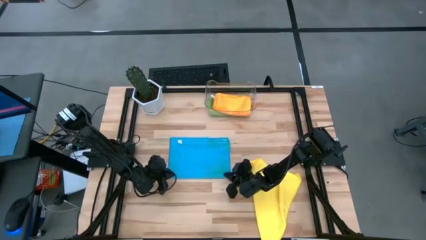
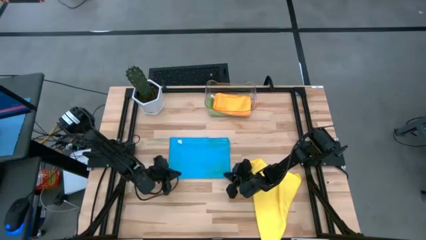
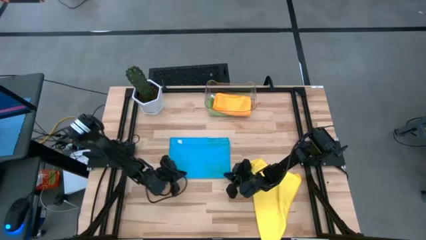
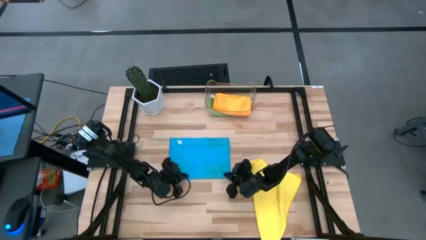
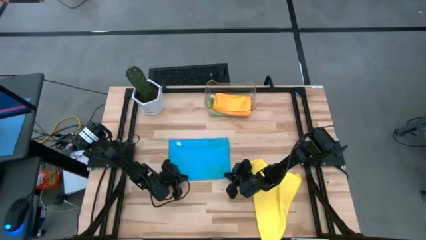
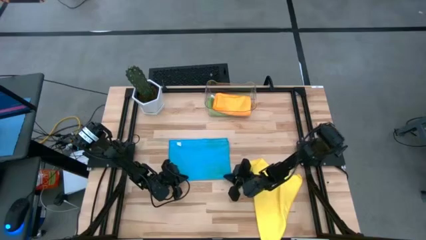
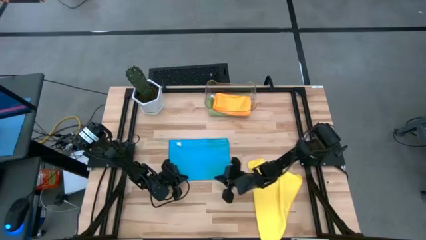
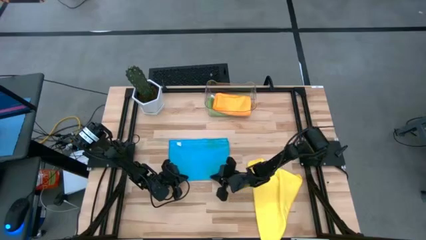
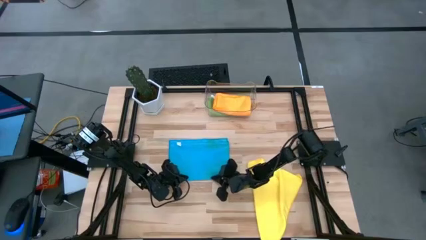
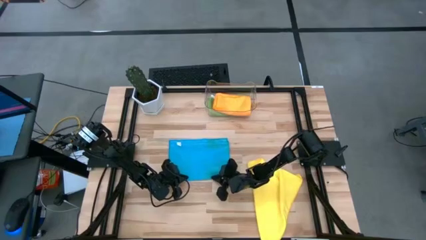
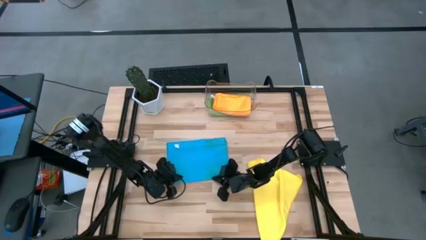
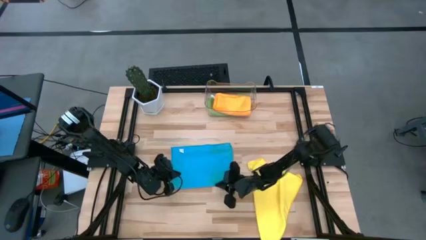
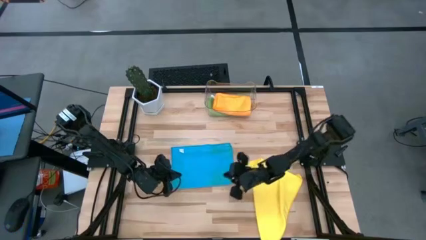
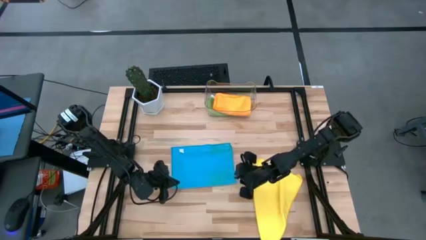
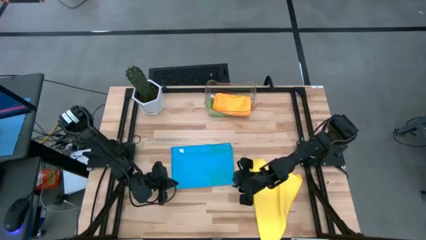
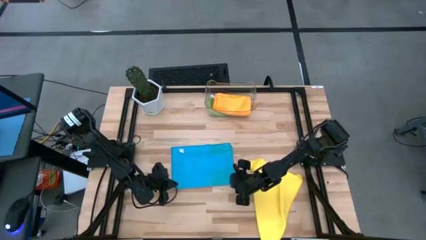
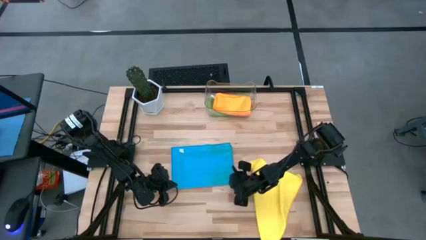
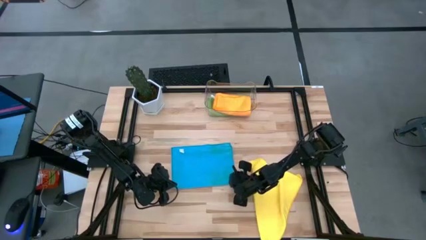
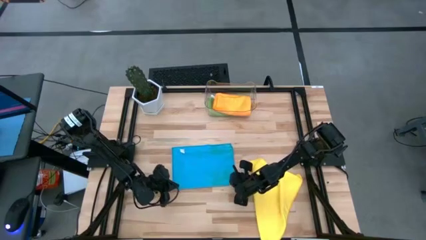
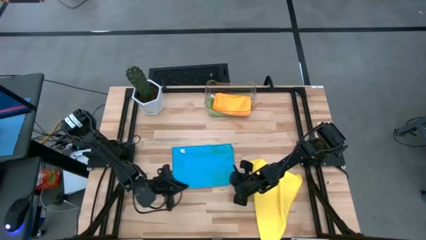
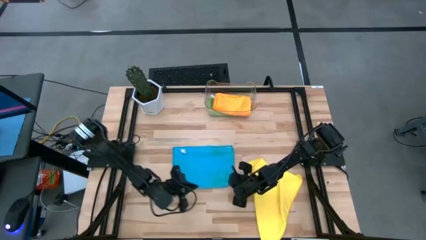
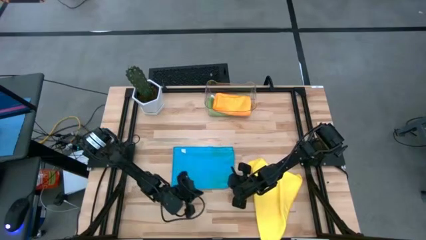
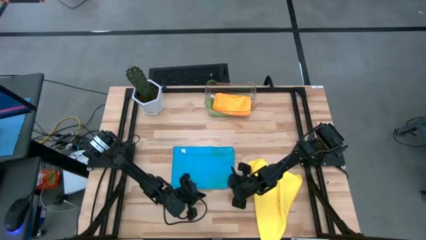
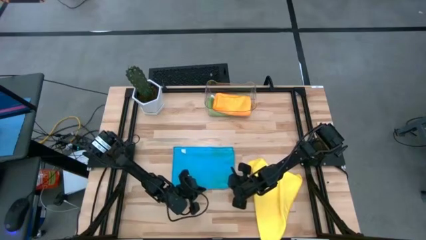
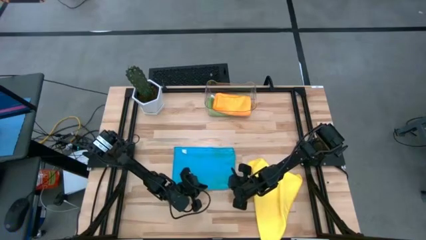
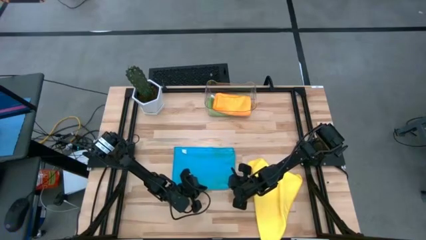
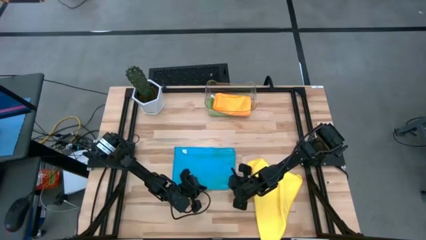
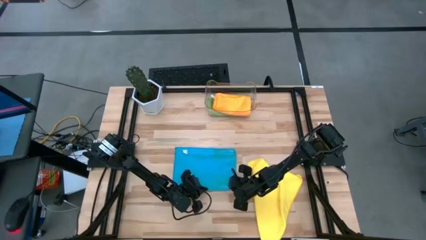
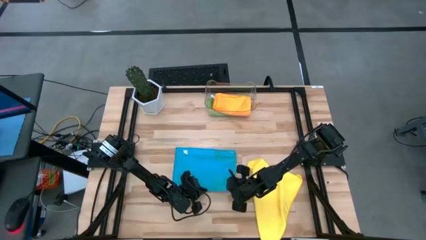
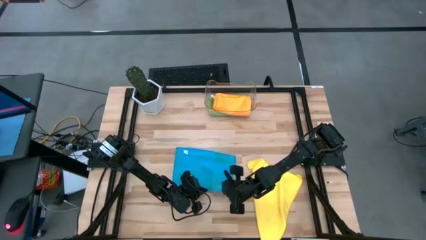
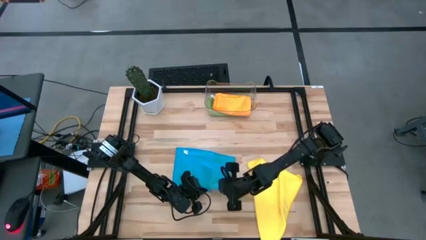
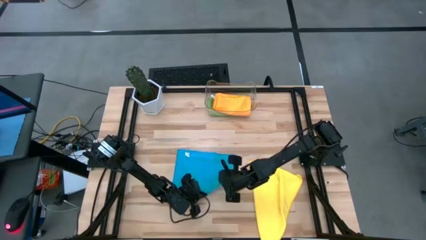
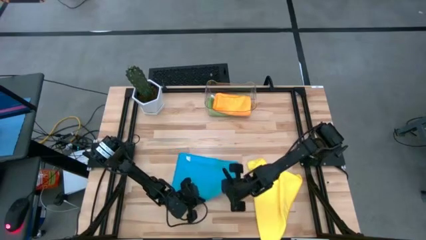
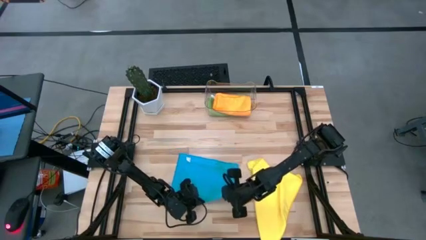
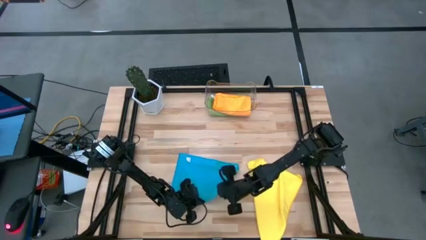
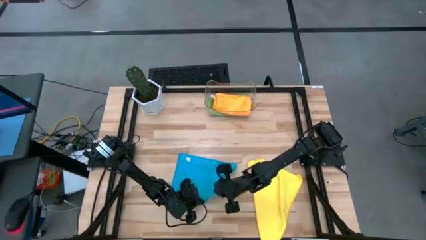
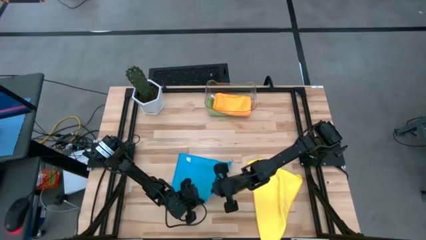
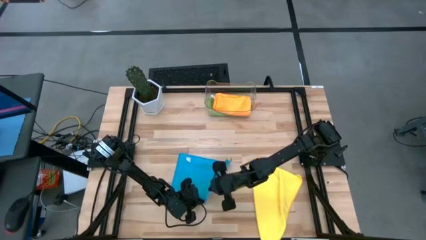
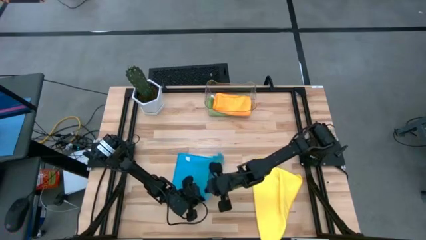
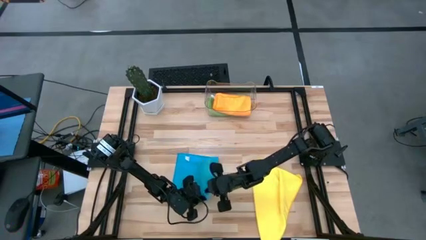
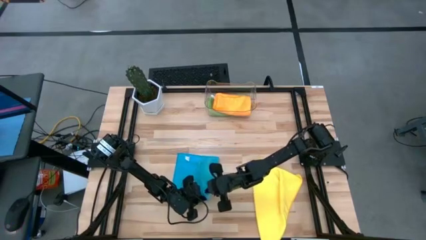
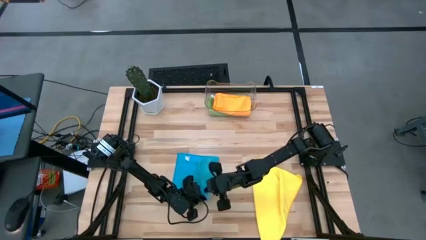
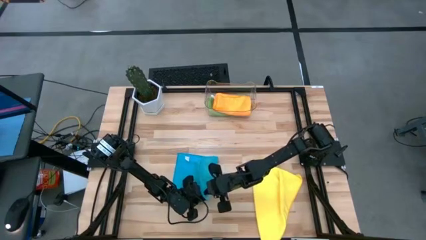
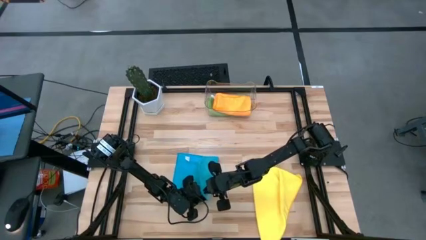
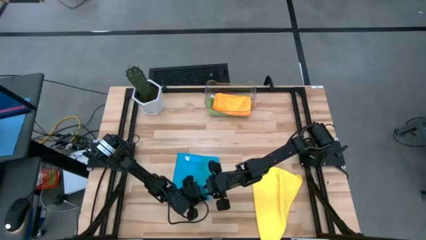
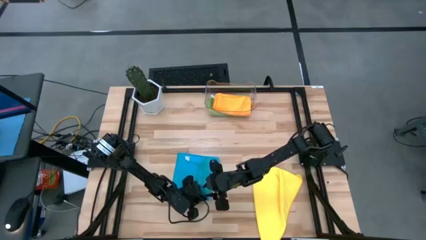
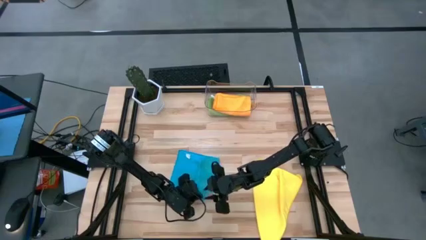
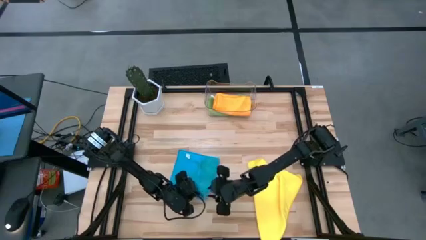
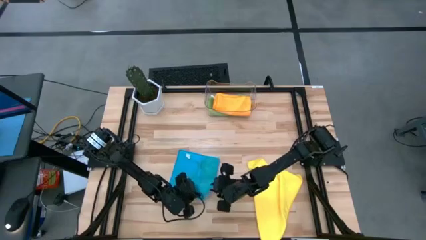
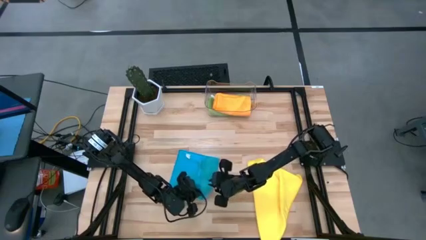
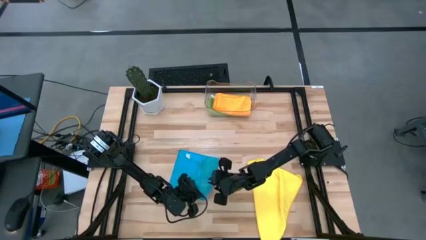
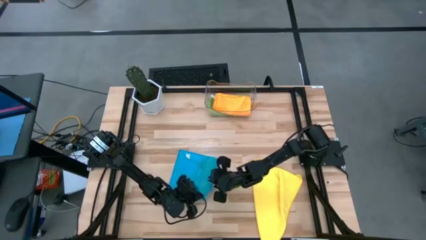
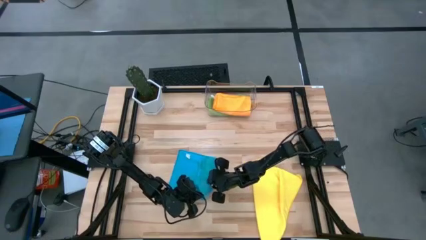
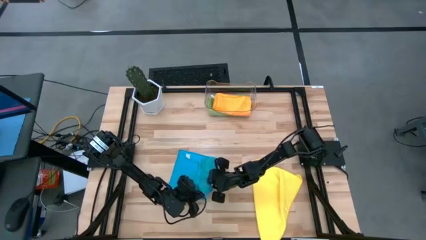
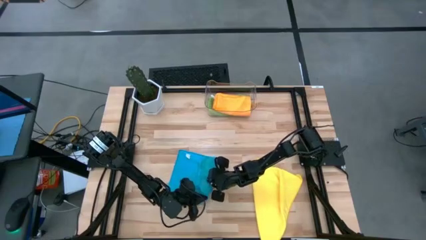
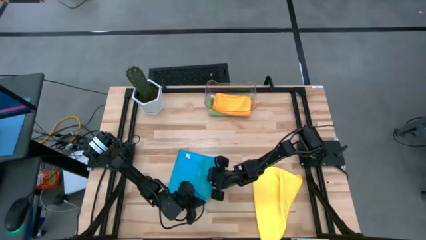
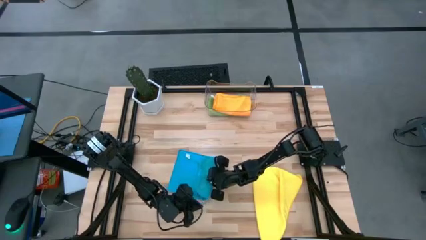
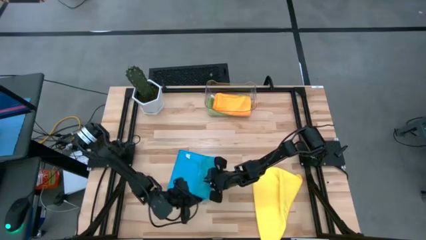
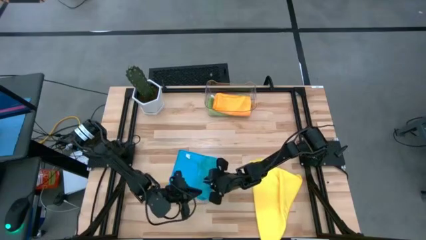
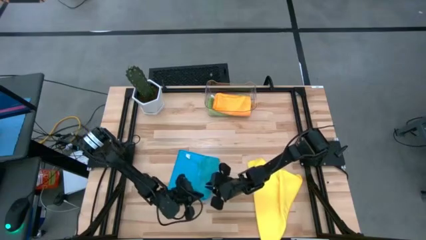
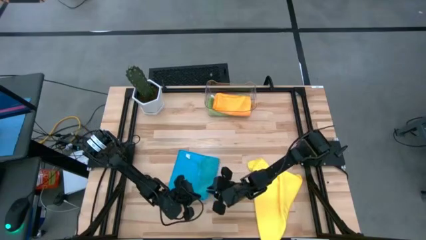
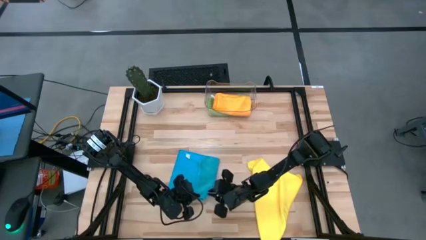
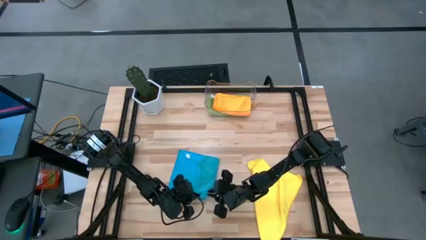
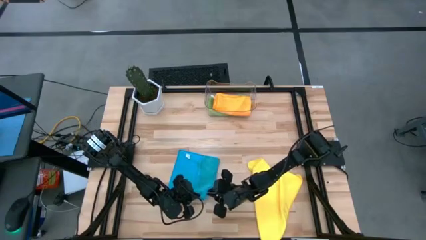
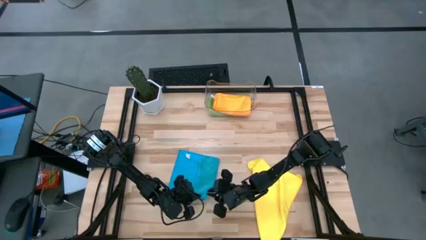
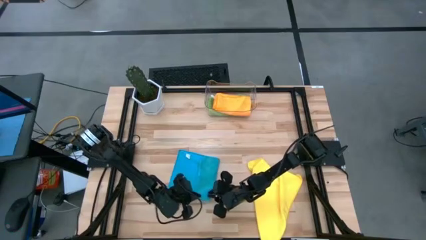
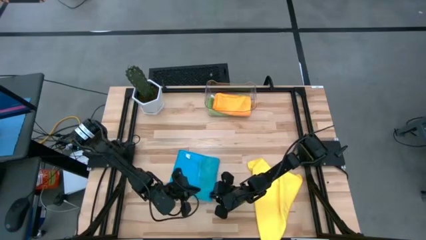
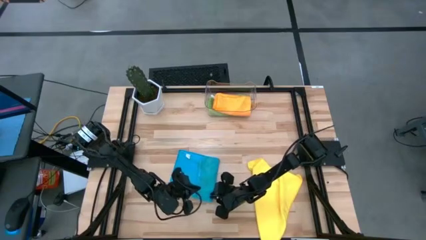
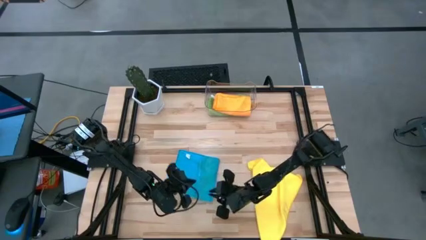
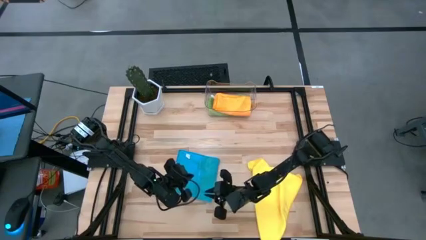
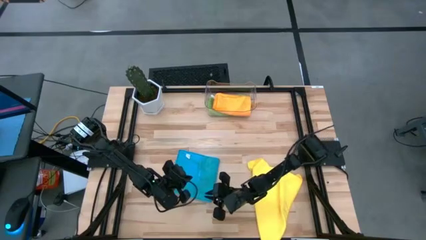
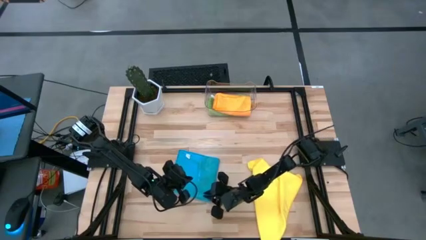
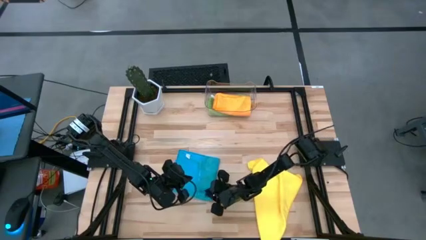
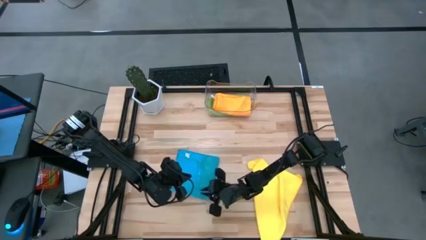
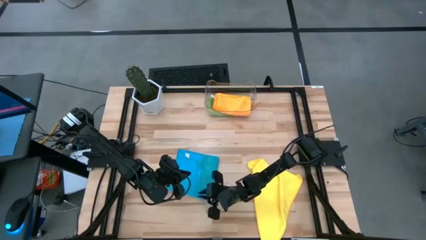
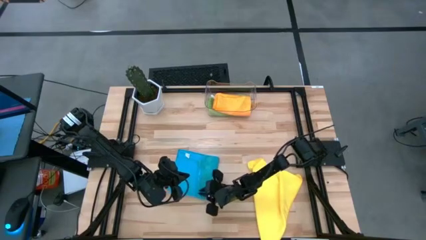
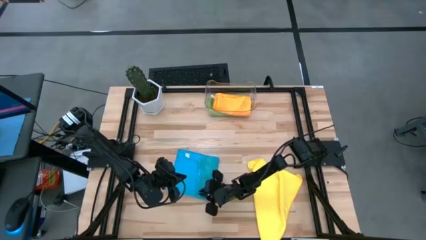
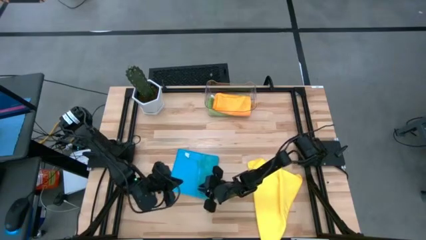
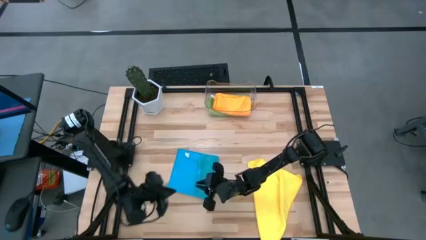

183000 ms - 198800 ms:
Task: Fold microfiber towels
Fold the blue towel
